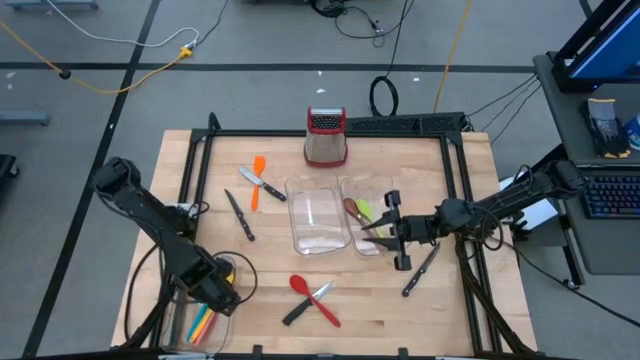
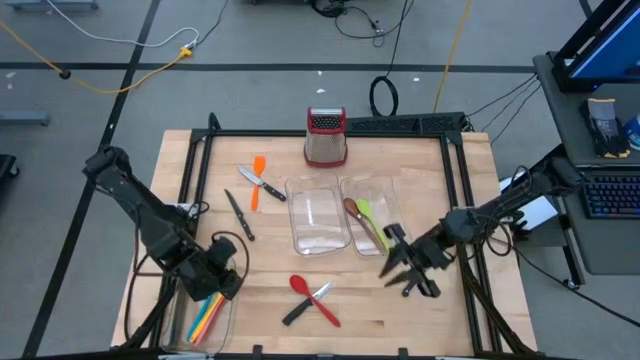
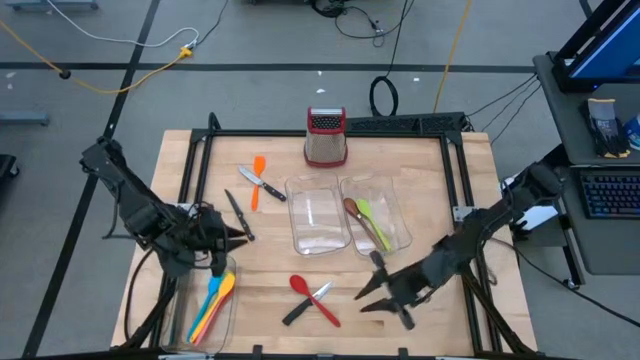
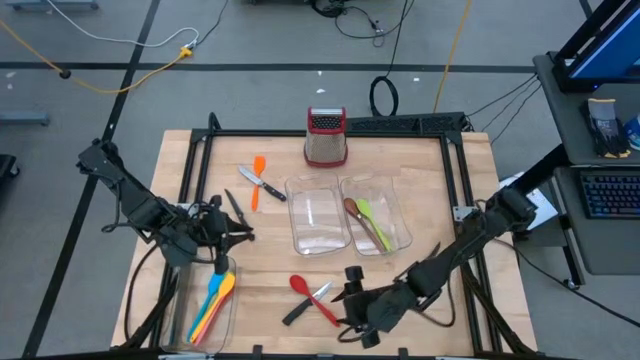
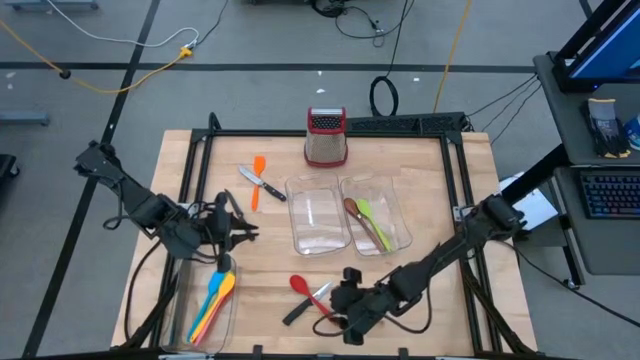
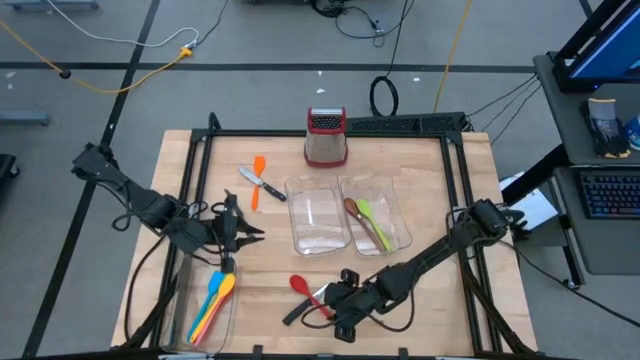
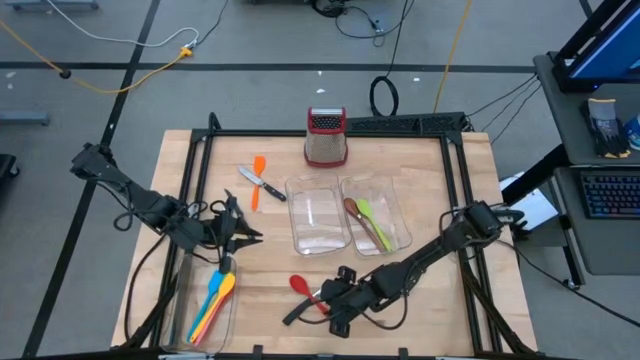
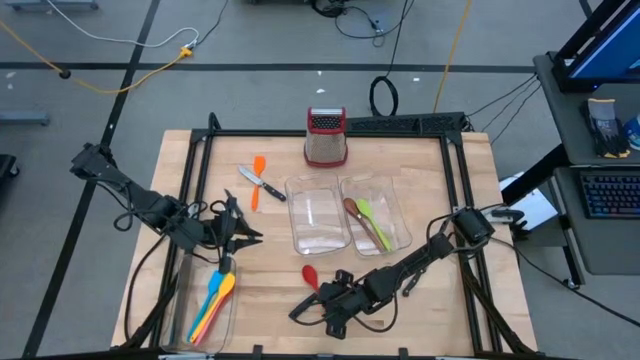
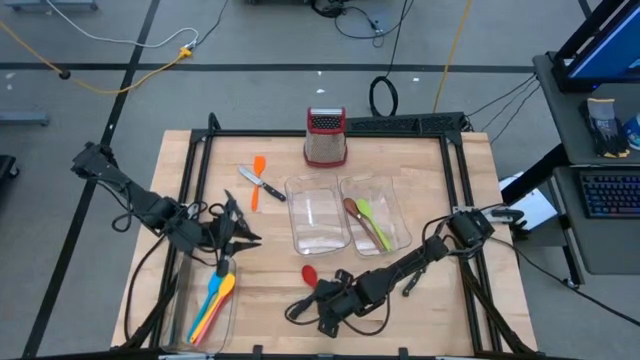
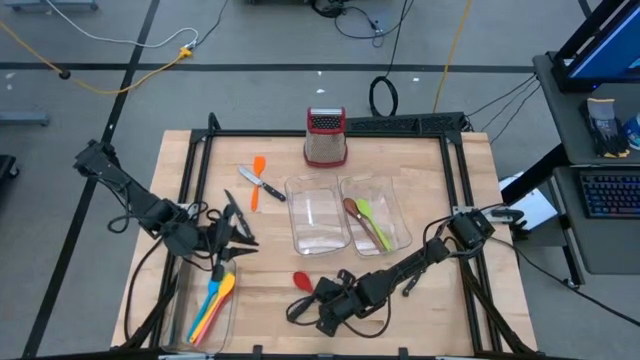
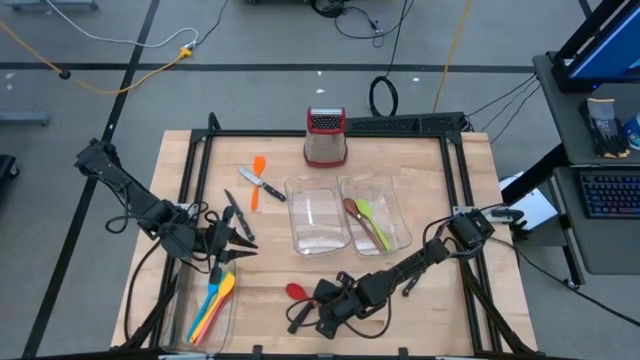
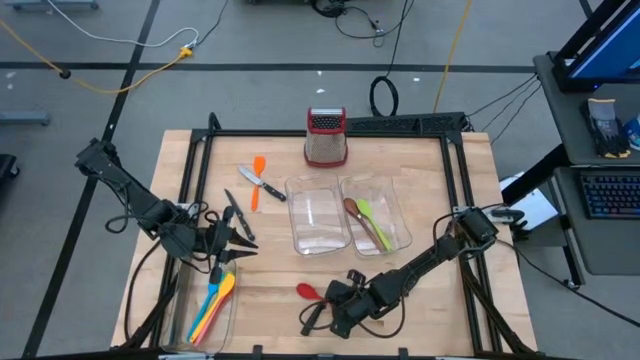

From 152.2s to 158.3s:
Task: Pick & Place Kitchen Items
Put the red serving spoon into the right transparent bin

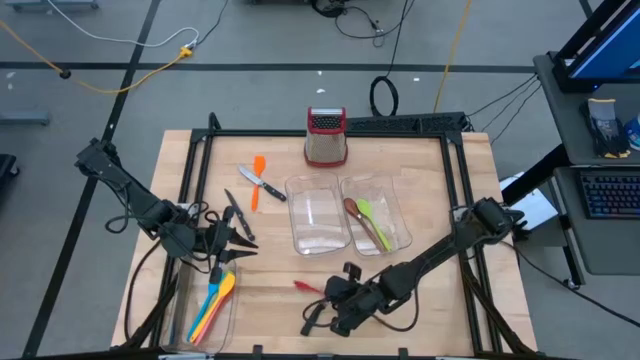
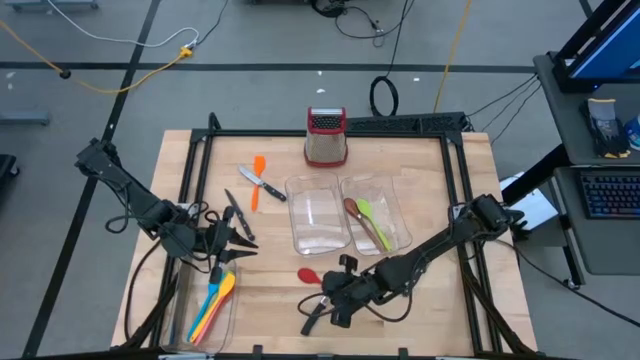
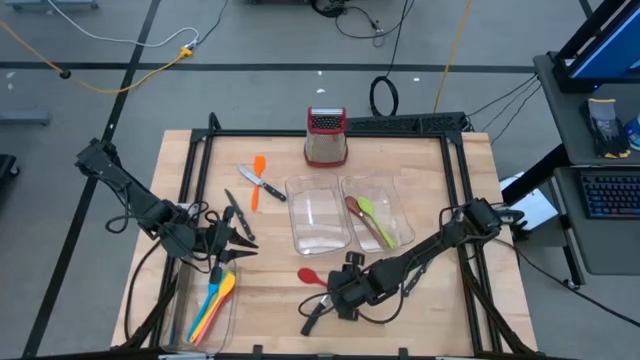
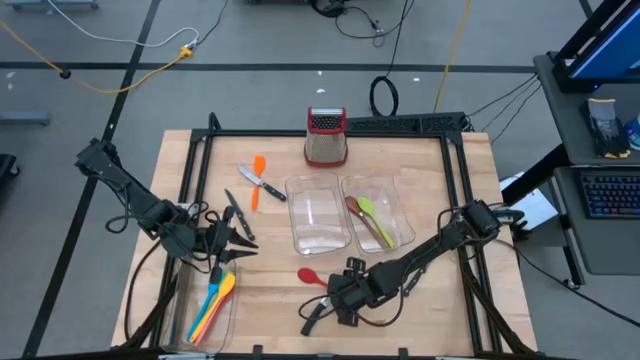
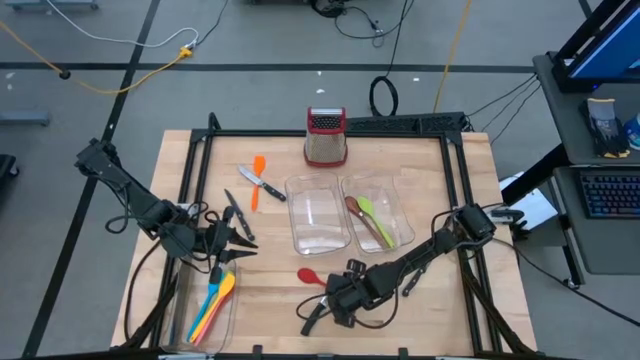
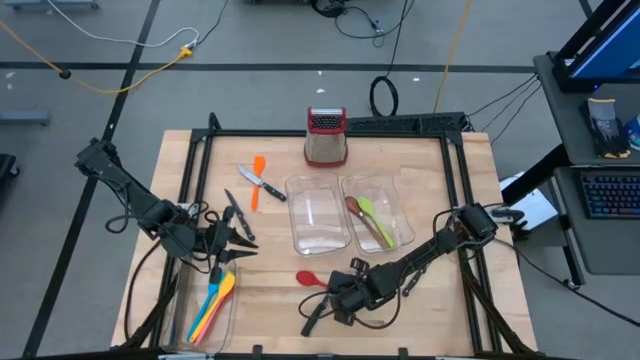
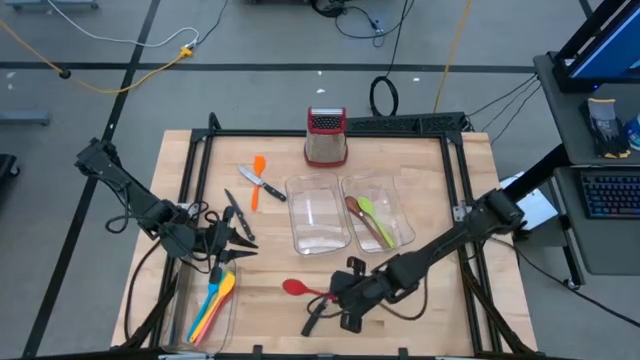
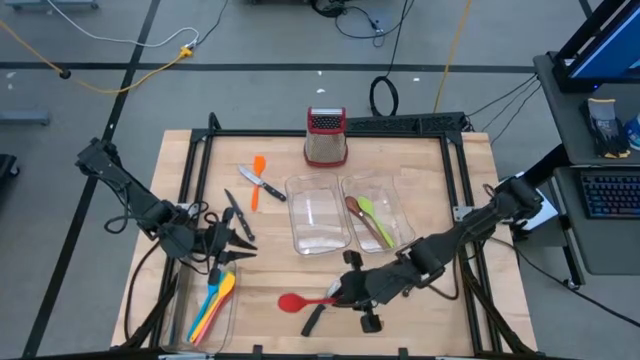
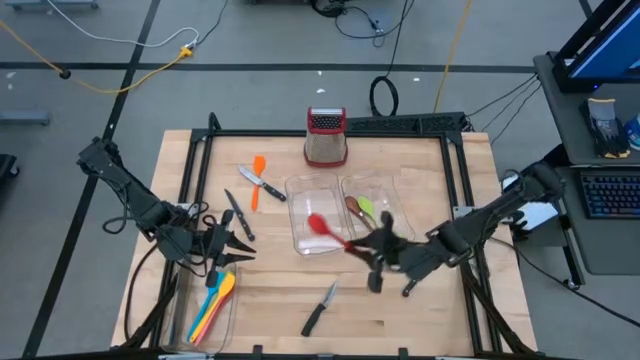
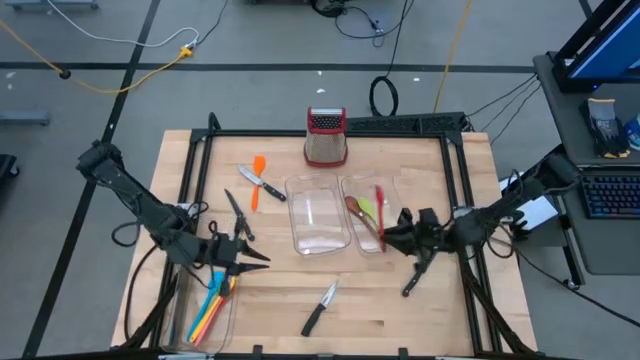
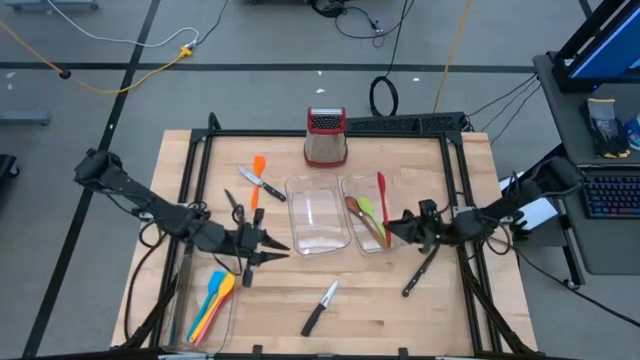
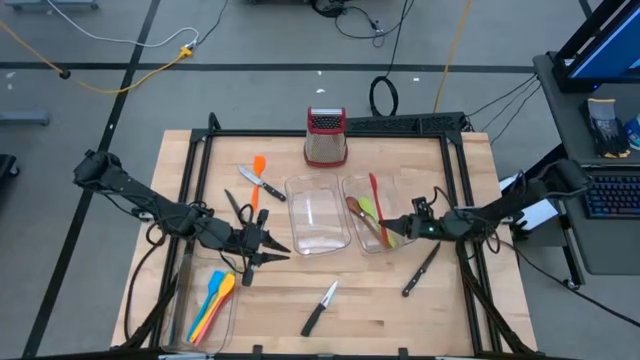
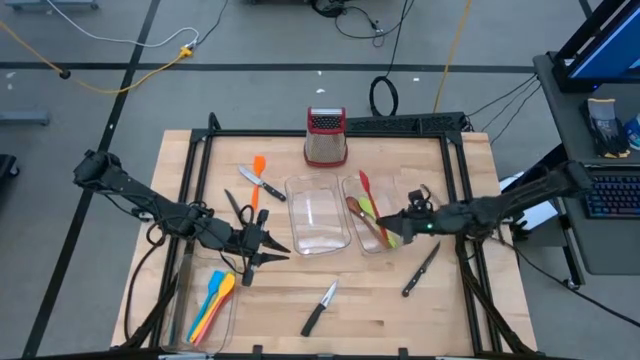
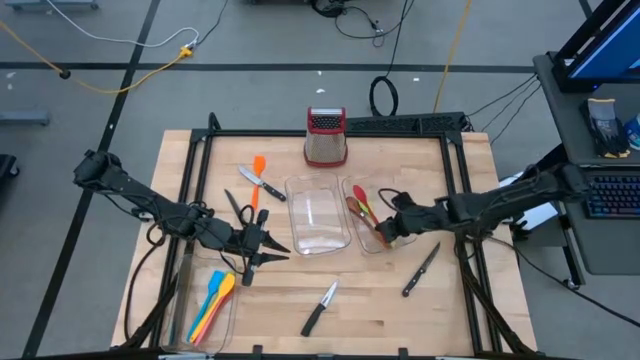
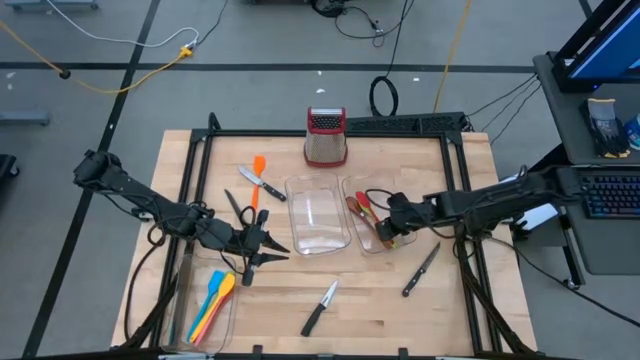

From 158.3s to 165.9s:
Put the red serving spoon into the right transparent bin

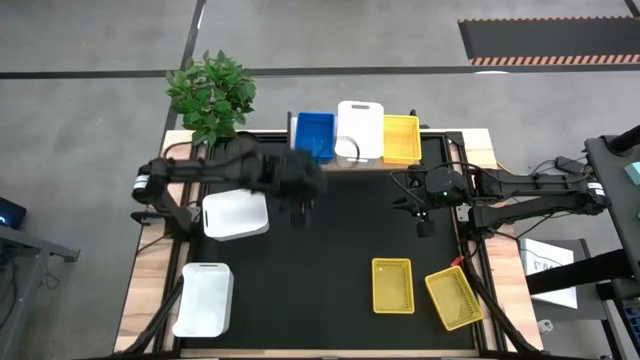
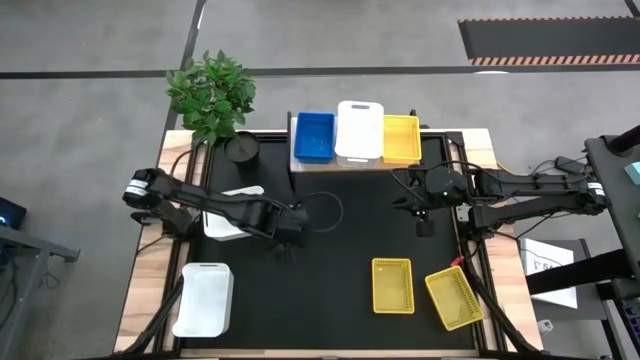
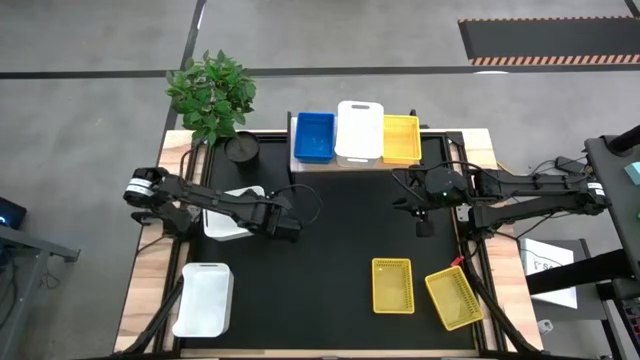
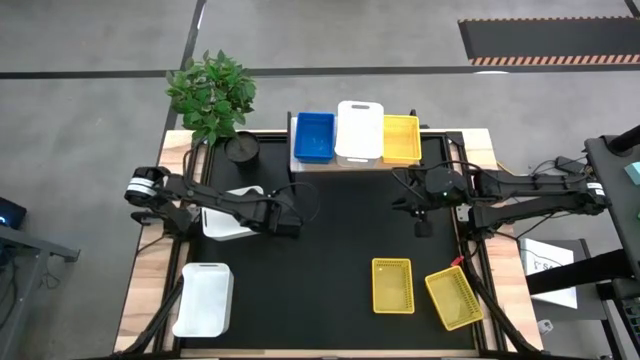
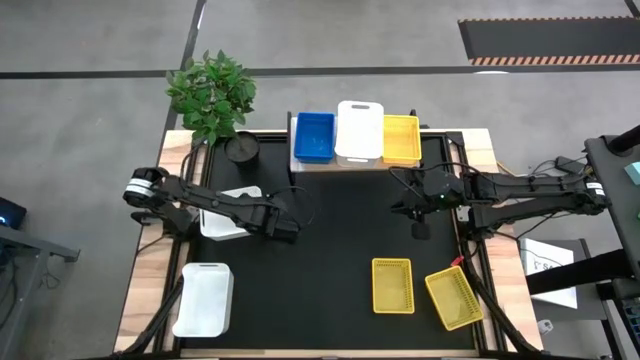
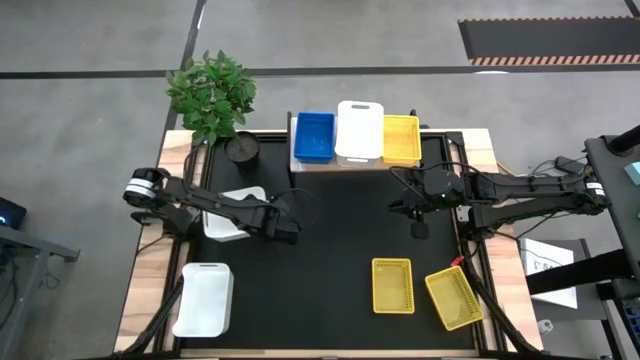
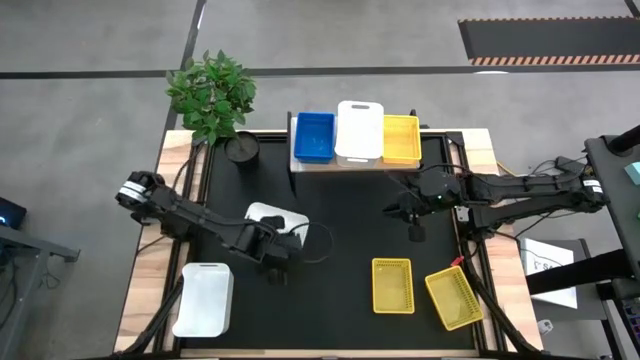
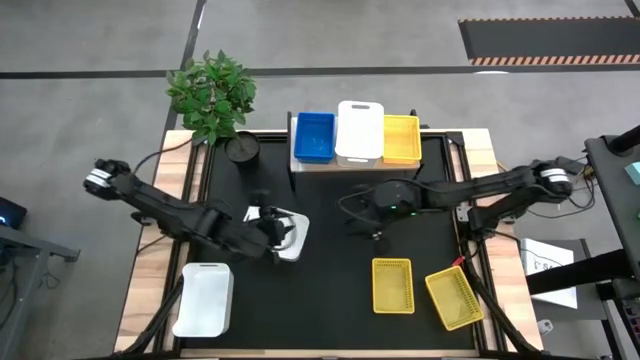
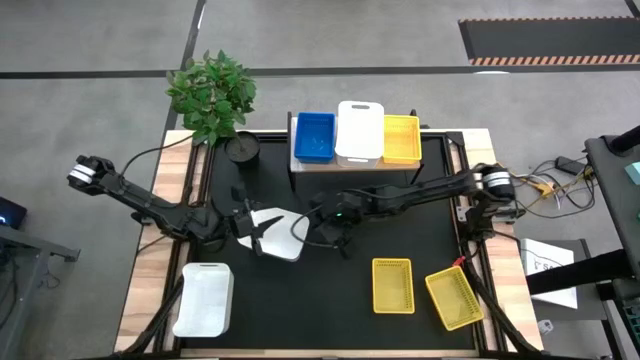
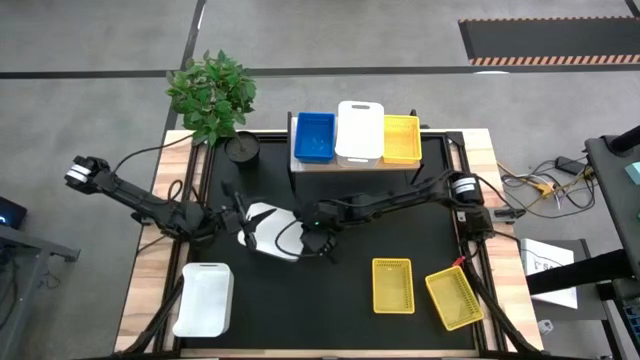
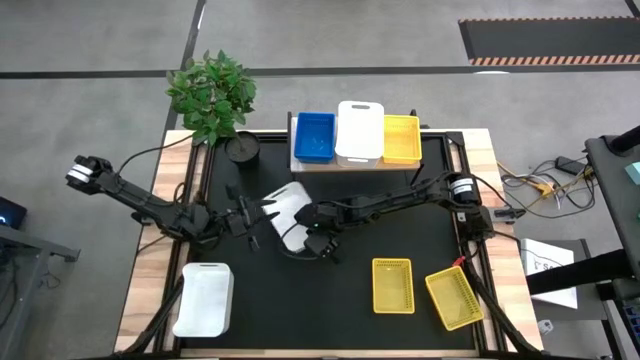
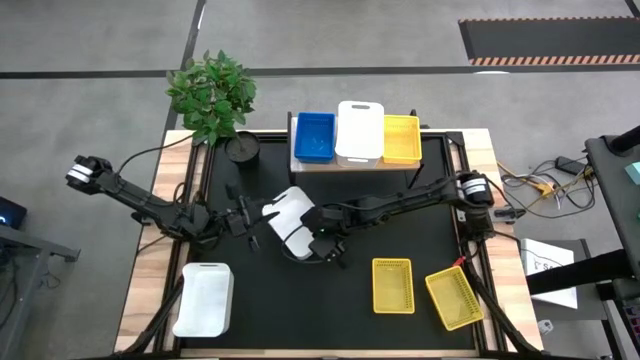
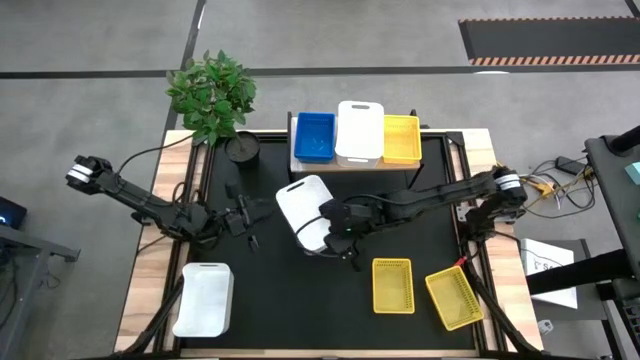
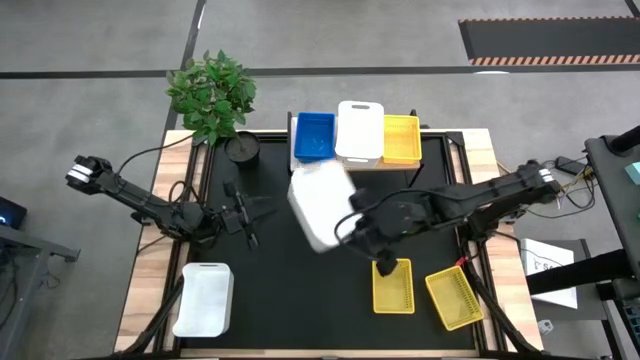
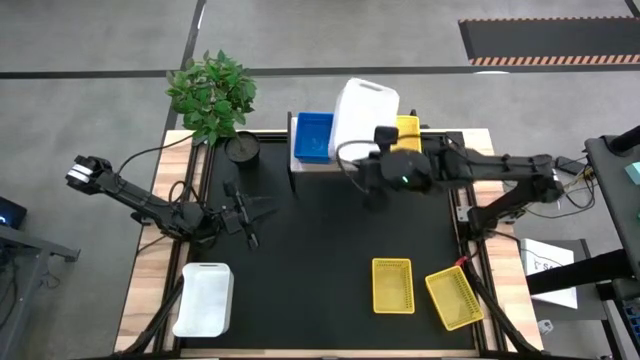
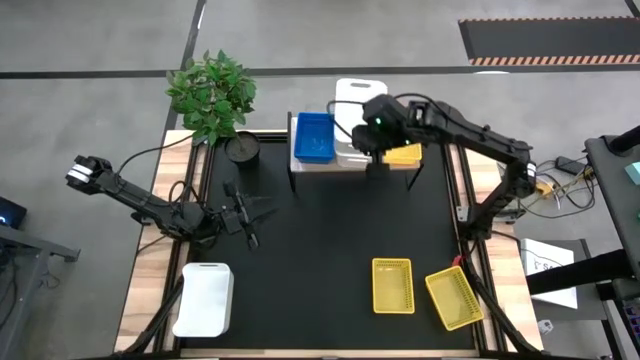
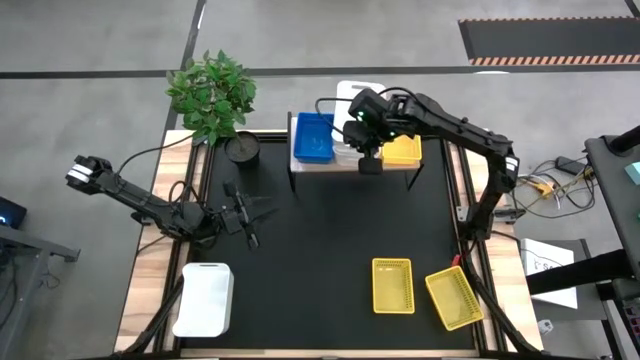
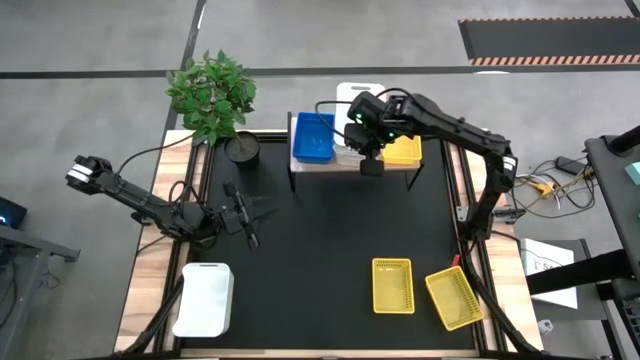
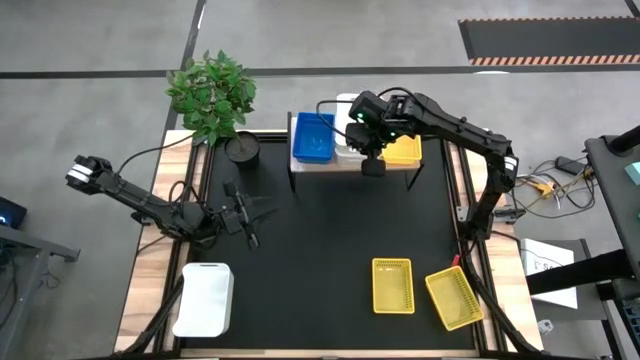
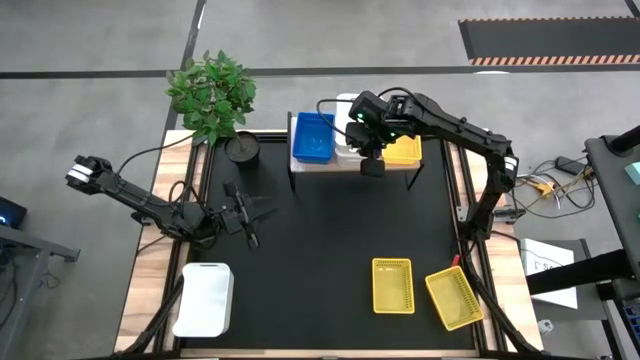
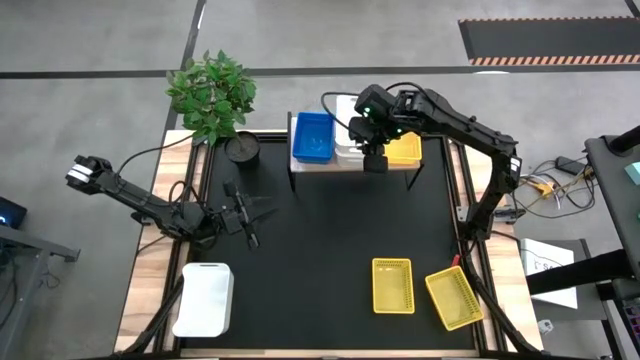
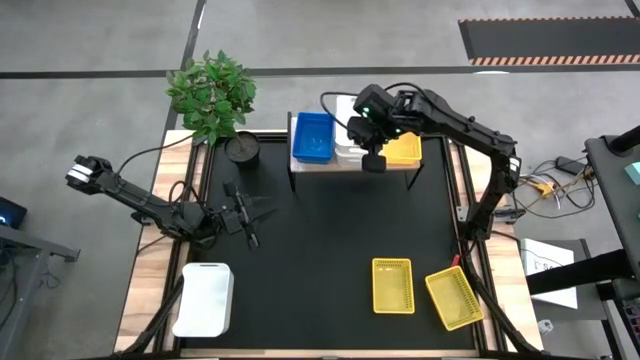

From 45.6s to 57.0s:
Task: Stack baskets on shelf by color
Stack the top white bin on the other white bin on the shelf
